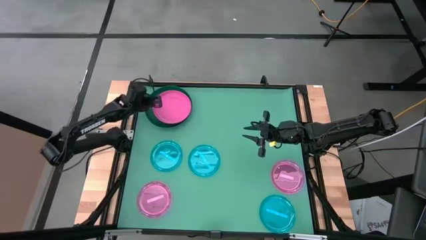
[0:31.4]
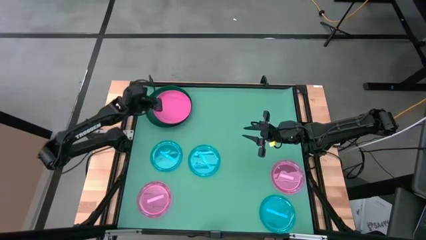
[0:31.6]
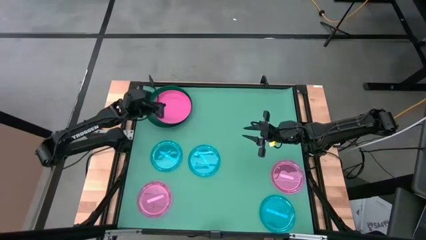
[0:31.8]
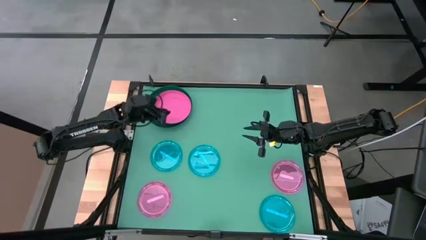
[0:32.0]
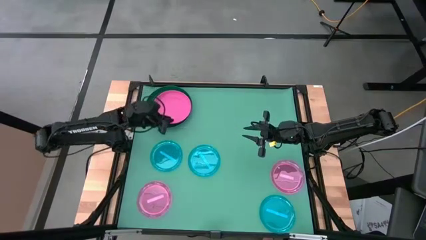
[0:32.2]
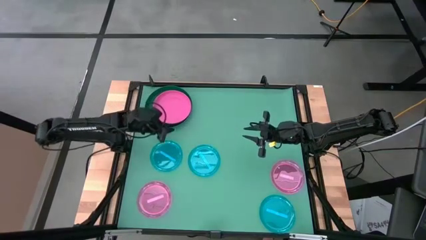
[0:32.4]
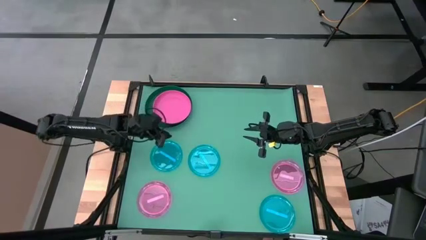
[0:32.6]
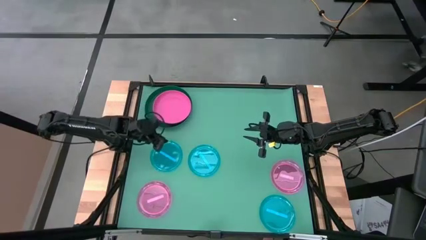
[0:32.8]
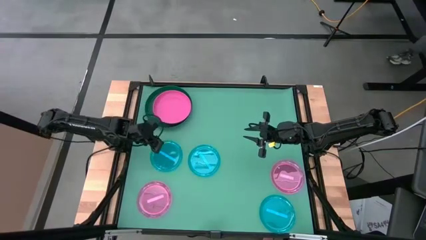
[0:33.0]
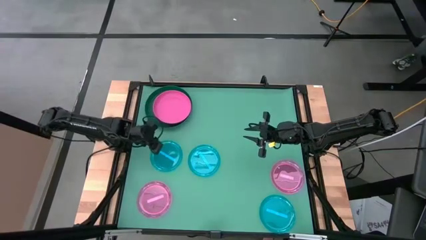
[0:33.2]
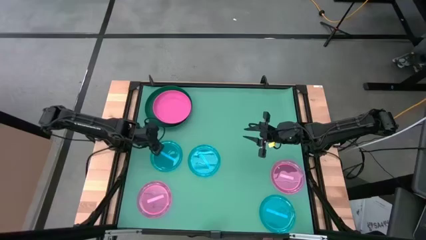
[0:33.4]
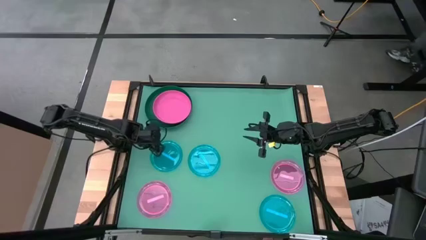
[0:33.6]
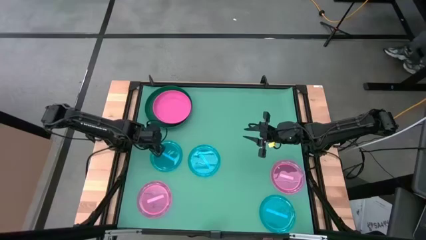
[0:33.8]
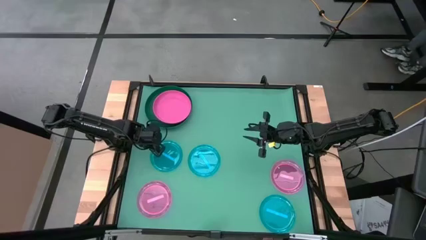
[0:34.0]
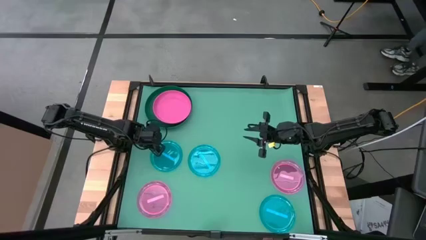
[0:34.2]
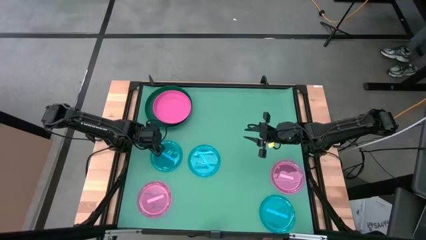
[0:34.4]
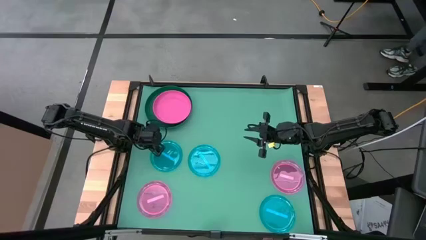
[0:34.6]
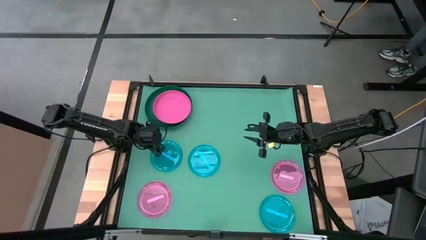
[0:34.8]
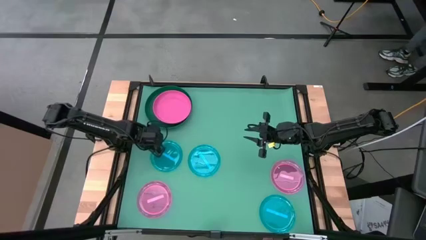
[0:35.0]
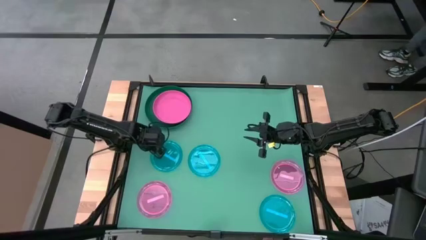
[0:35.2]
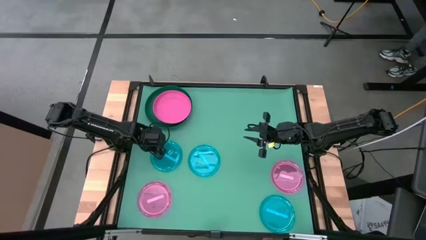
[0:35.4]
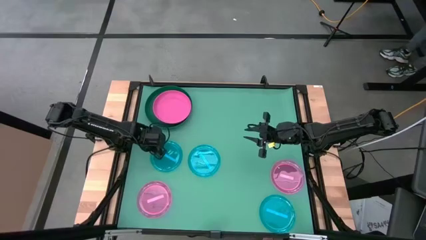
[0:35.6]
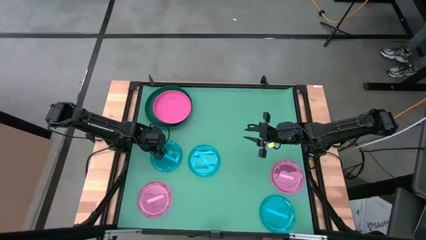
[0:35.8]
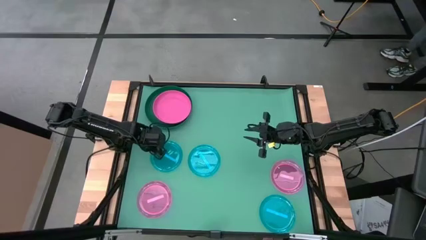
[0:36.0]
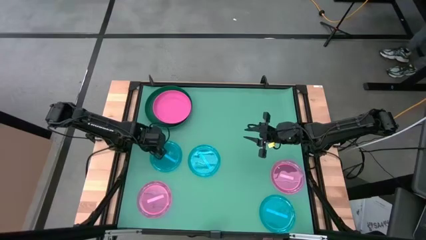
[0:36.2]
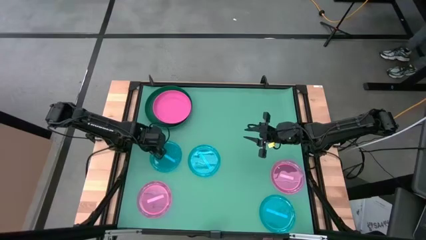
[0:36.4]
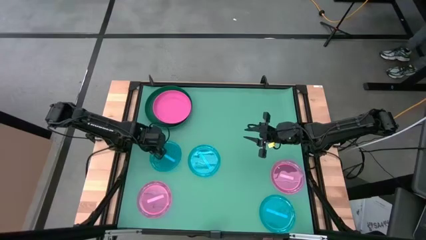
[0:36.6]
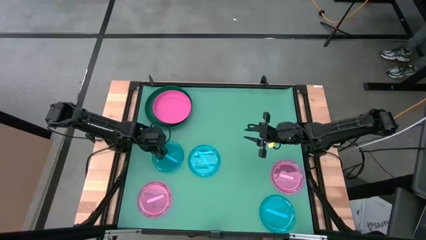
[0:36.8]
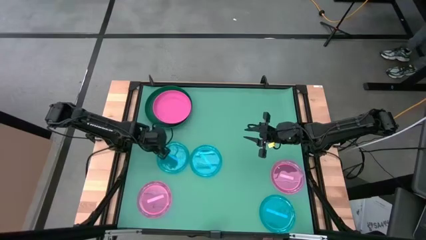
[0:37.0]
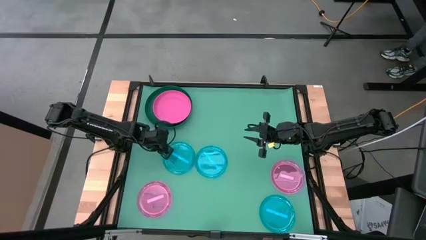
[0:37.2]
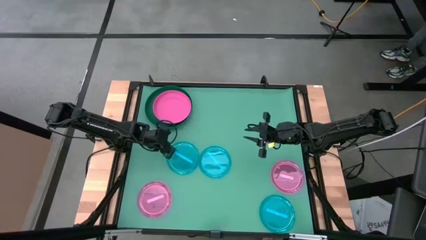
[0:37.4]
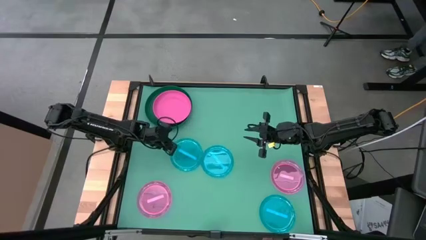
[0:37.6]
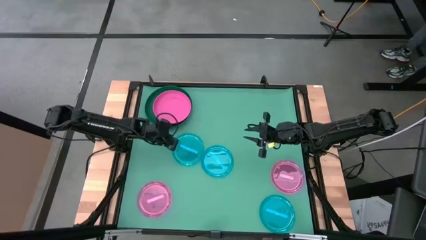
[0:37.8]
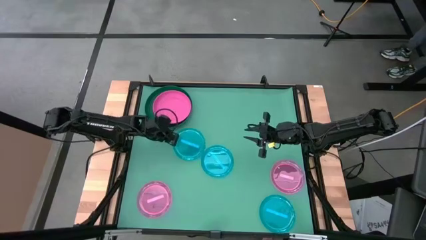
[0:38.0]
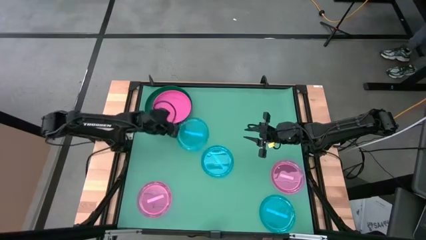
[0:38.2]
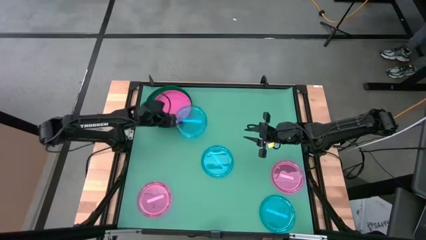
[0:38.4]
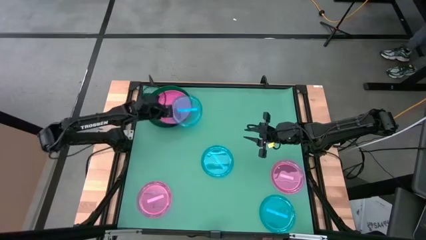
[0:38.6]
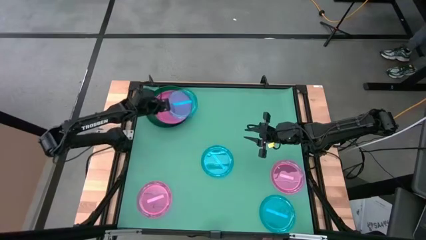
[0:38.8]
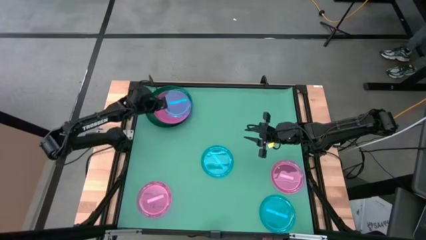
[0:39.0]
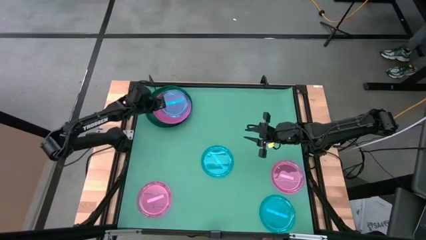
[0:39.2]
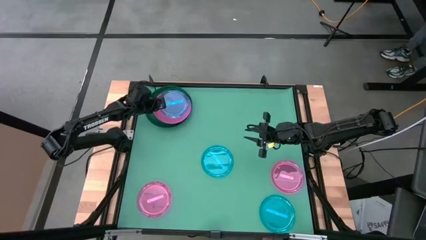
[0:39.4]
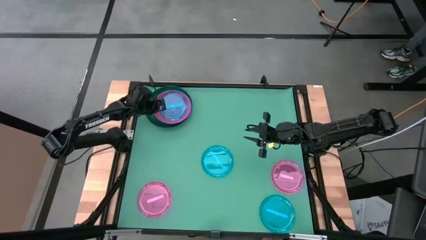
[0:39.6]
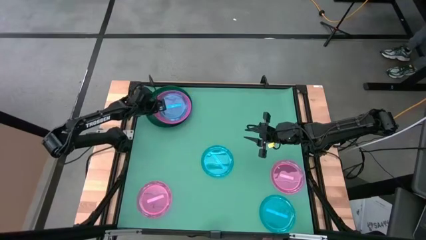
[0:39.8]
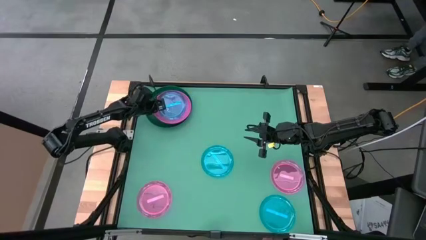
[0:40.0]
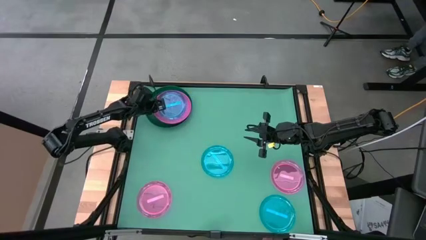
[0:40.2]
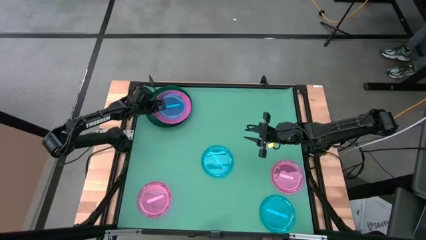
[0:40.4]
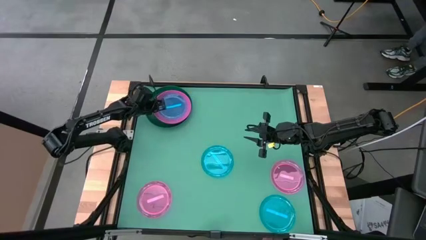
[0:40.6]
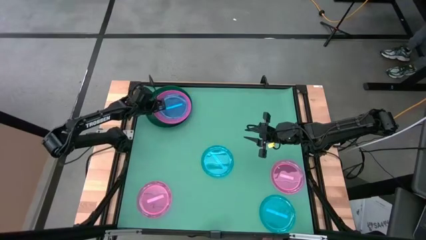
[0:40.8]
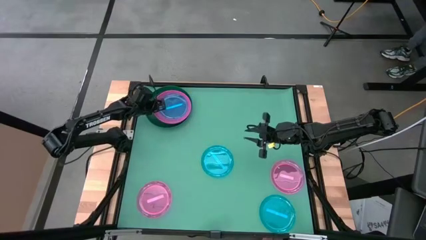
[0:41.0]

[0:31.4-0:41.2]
Task: Stack plastic plates
Stack the top left blue plate on top of the pink plate

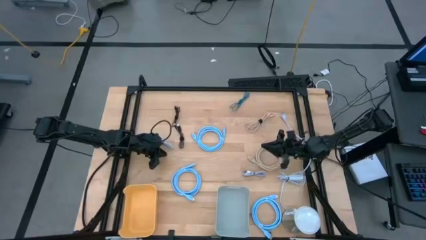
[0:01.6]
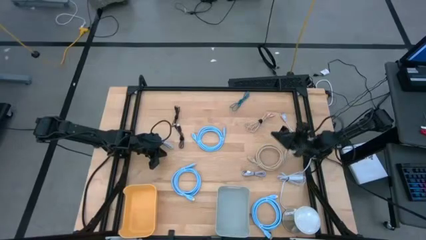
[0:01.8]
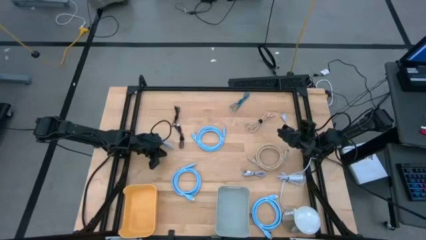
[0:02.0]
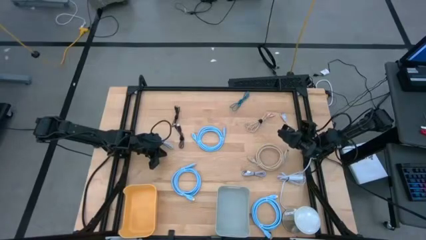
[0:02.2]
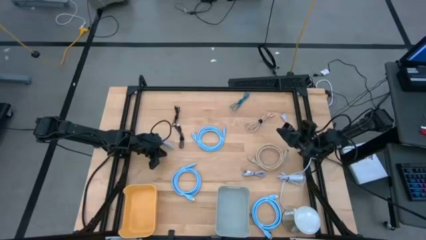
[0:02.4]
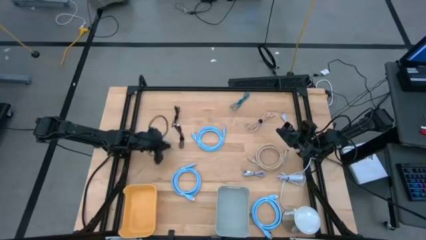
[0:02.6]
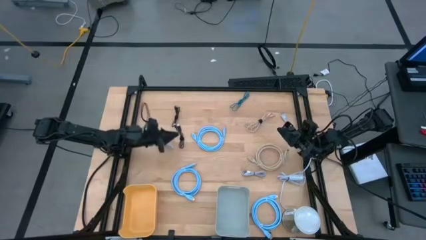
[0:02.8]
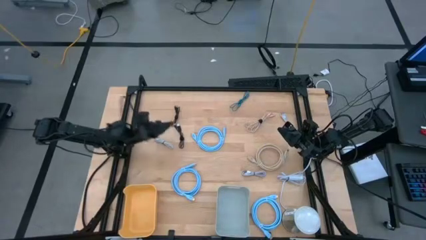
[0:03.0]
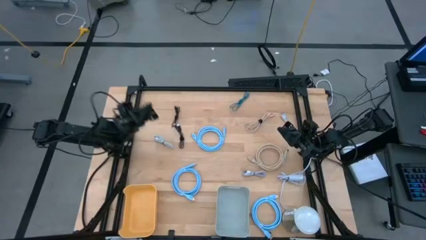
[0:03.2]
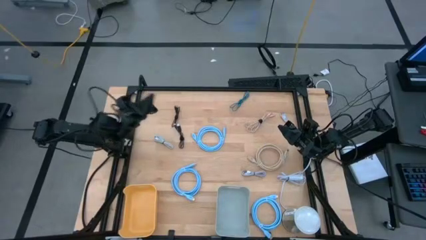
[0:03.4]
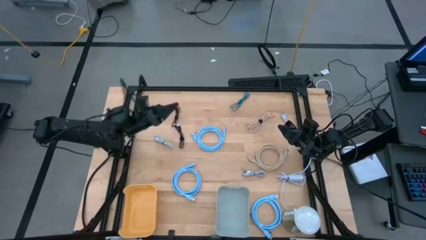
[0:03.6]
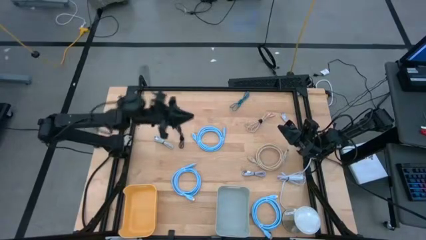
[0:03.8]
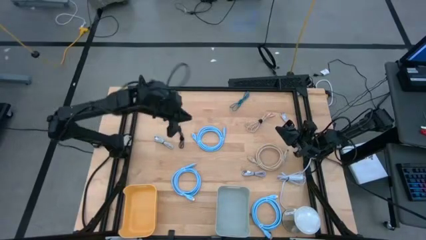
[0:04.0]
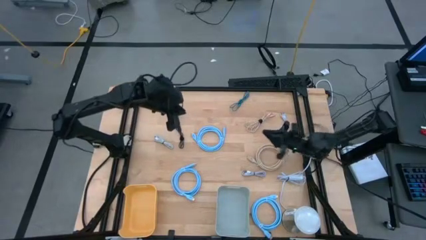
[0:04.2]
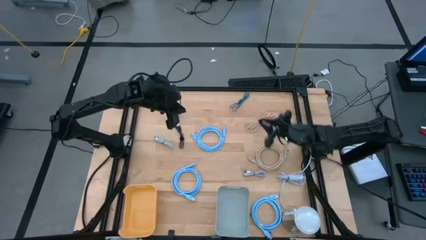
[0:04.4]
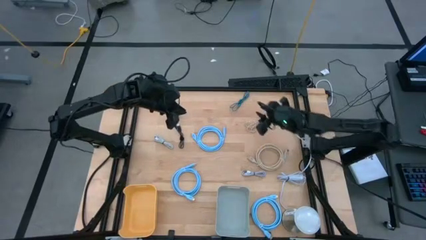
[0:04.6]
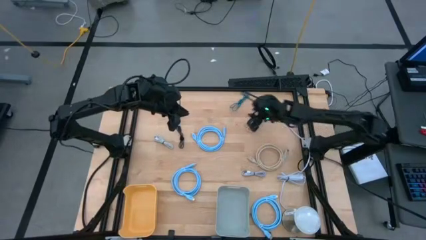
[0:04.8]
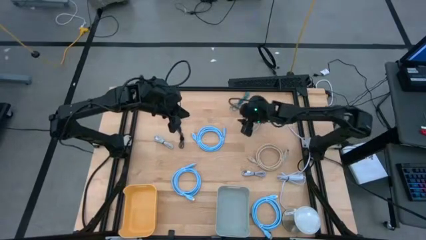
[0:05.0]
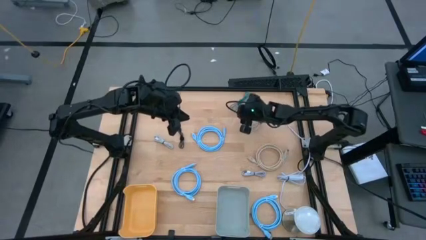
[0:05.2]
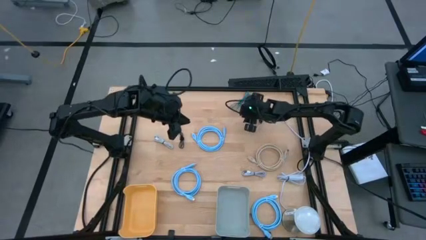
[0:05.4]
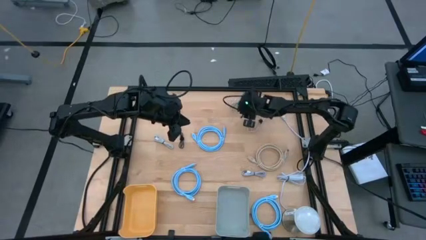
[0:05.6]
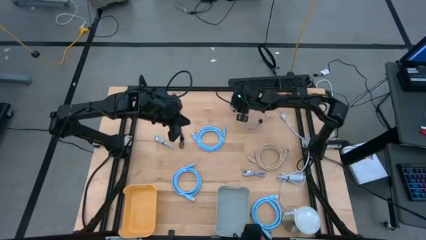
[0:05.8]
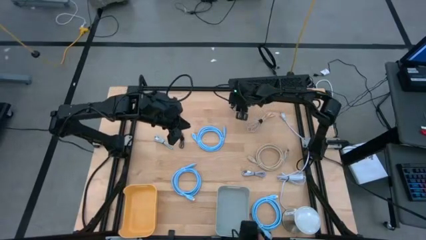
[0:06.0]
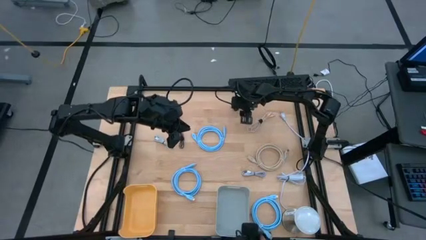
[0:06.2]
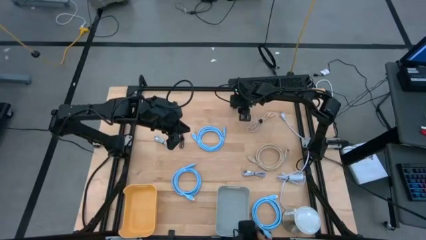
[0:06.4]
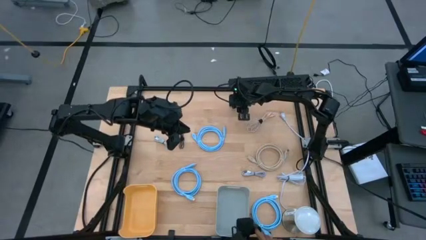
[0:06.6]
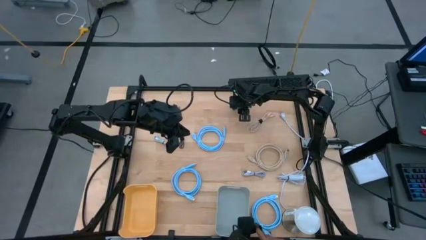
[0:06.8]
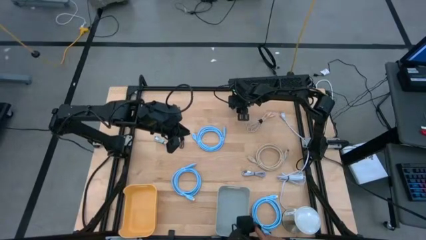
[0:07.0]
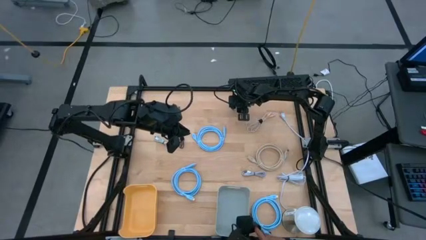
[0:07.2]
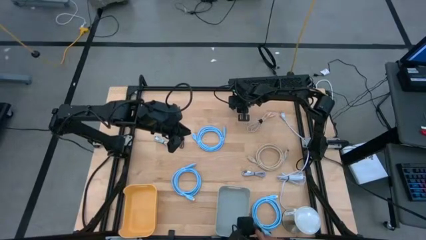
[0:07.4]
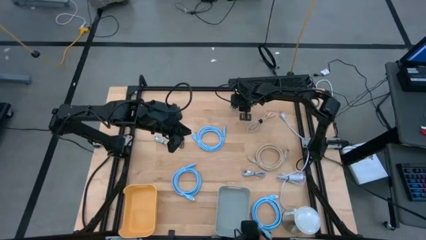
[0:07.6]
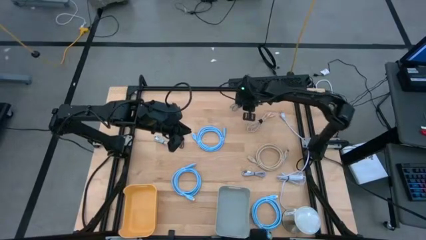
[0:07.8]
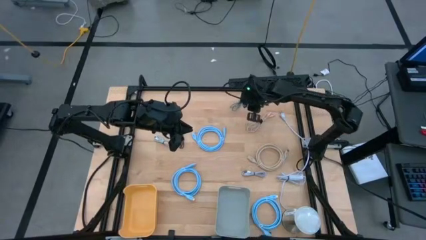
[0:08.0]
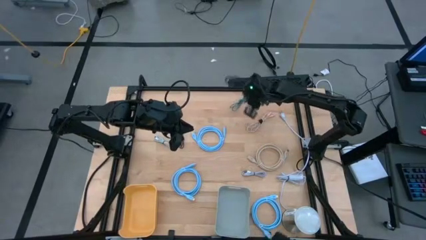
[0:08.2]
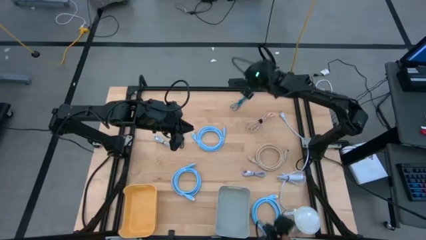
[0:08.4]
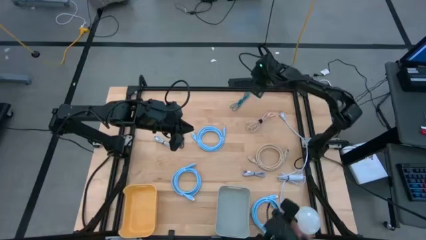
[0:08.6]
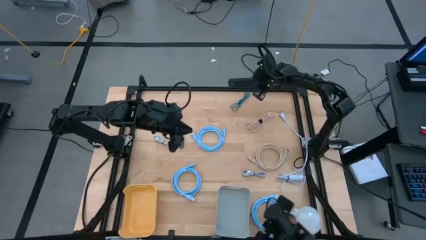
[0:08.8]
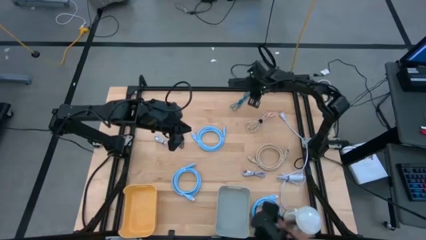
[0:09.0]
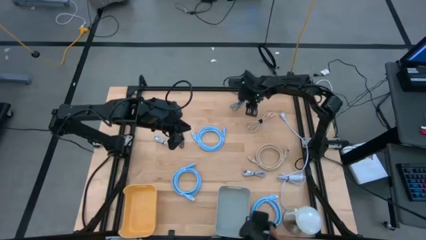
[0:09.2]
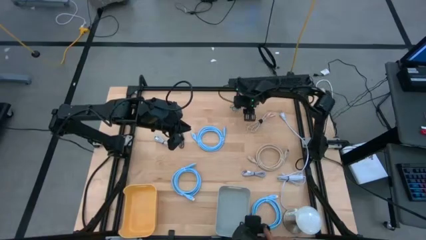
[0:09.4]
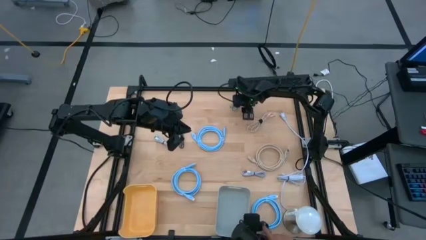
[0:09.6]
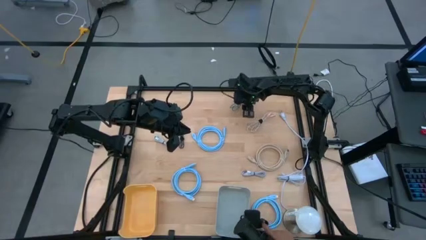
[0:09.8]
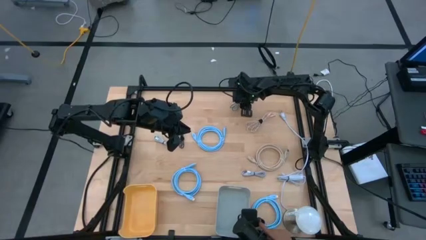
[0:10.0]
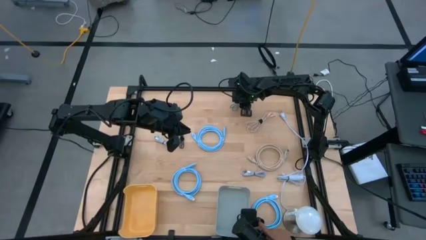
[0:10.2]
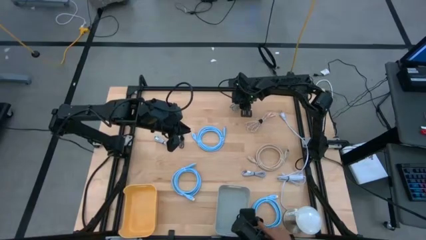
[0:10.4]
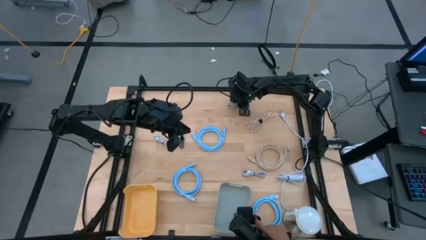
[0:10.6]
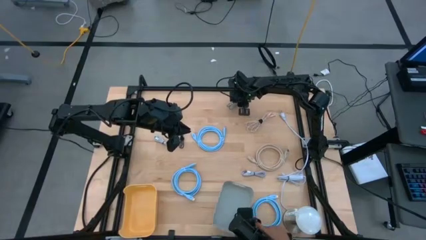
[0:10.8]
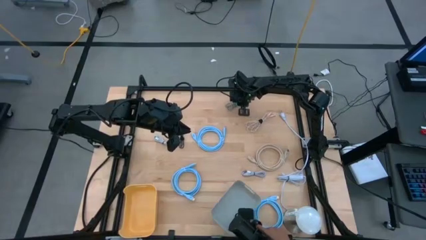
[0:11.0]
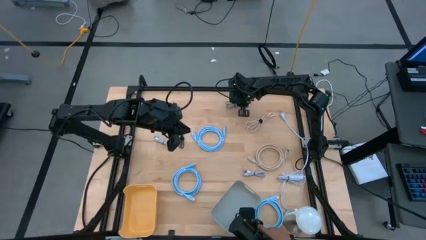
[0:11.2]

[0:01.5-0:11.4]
Task: Sort cables
Put the green charger cable into the gray bin
